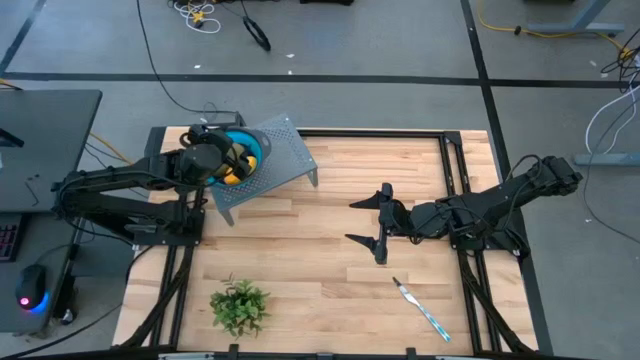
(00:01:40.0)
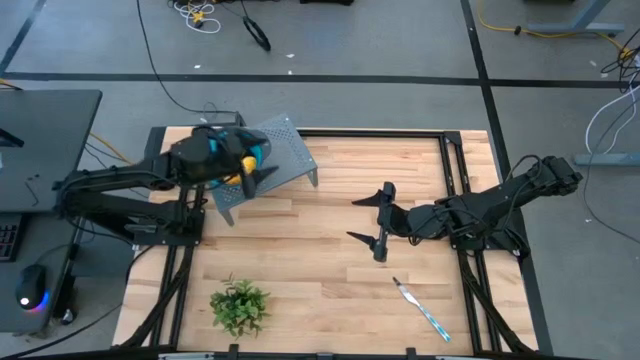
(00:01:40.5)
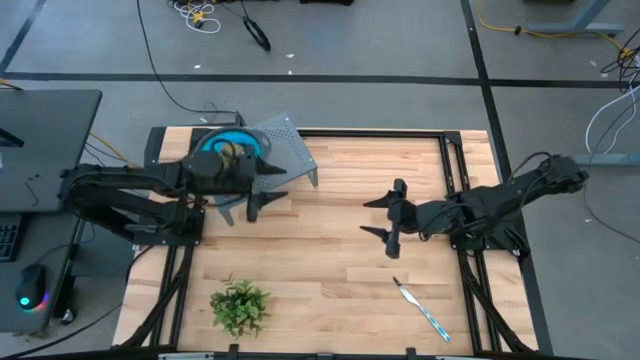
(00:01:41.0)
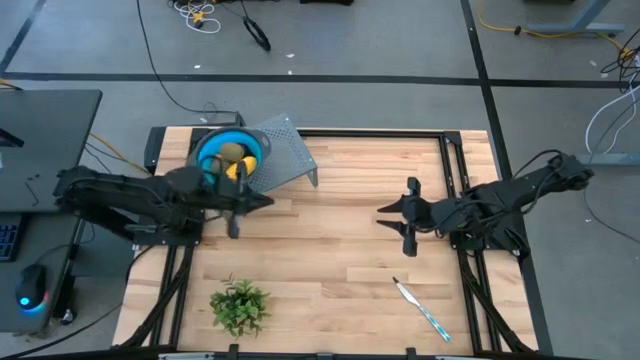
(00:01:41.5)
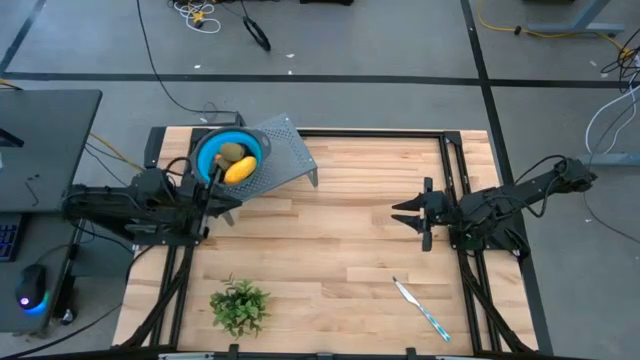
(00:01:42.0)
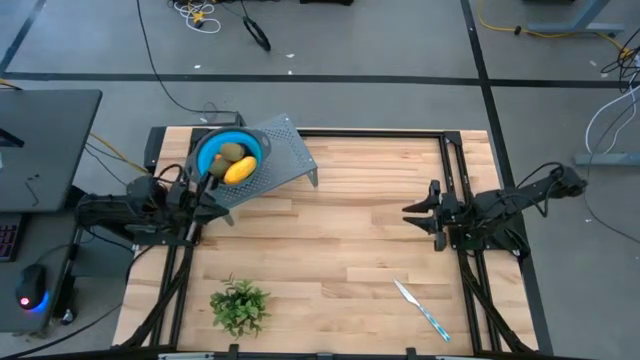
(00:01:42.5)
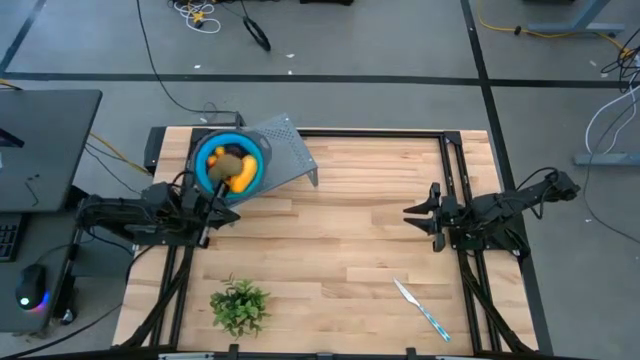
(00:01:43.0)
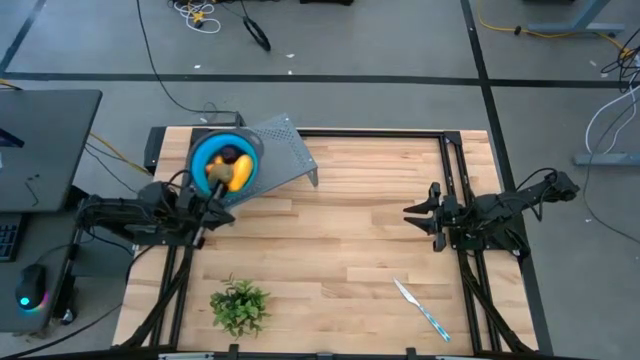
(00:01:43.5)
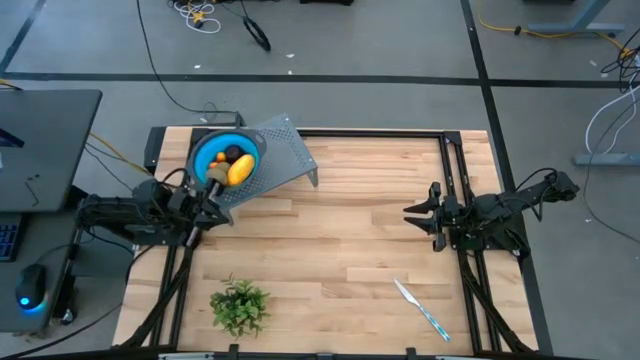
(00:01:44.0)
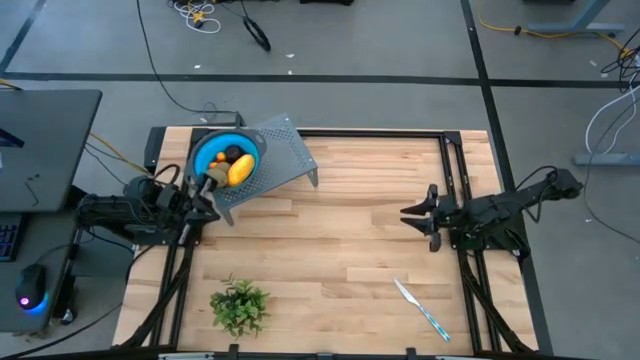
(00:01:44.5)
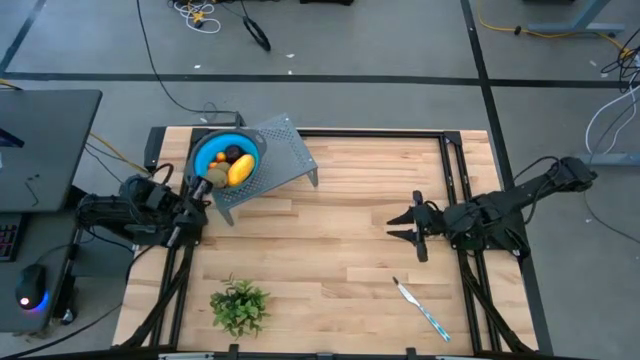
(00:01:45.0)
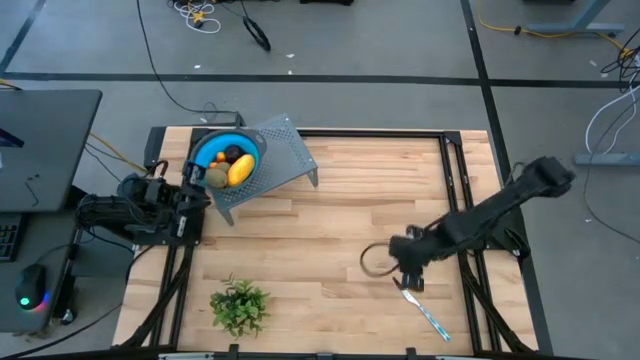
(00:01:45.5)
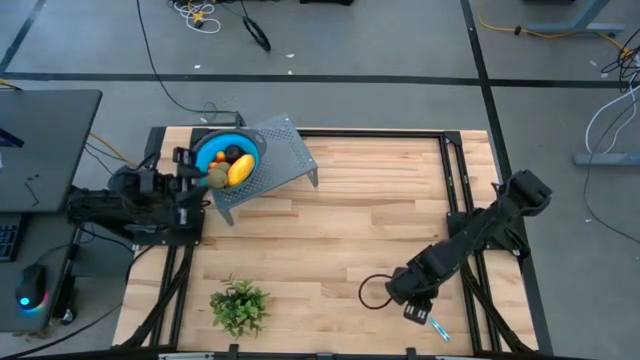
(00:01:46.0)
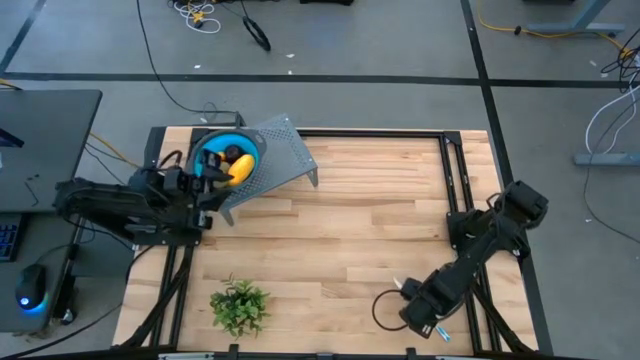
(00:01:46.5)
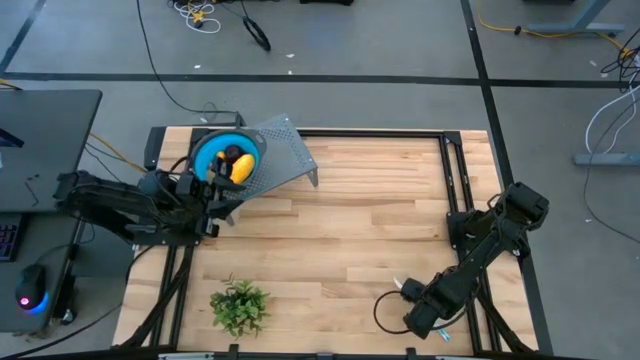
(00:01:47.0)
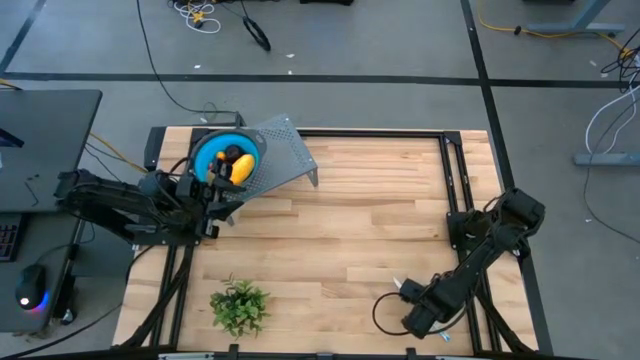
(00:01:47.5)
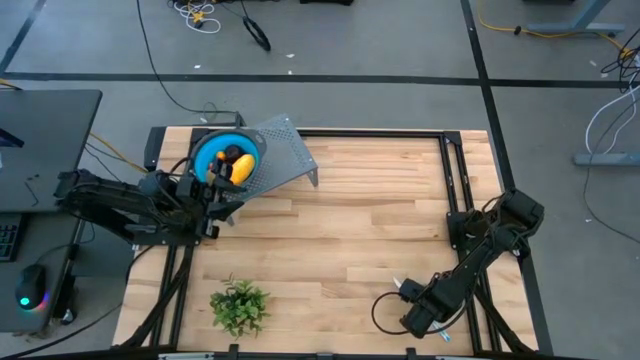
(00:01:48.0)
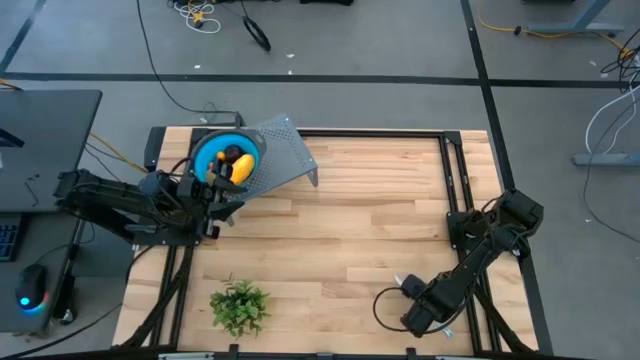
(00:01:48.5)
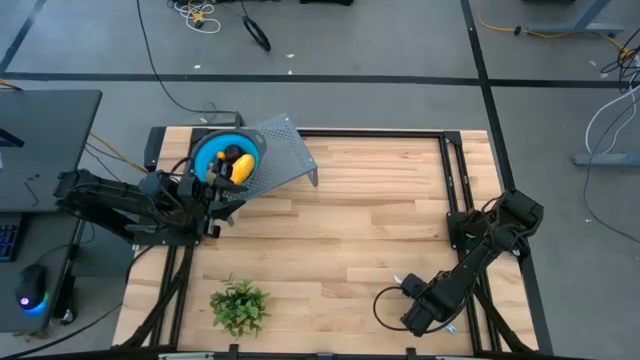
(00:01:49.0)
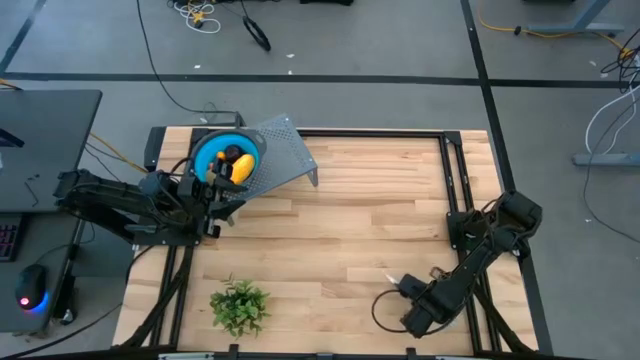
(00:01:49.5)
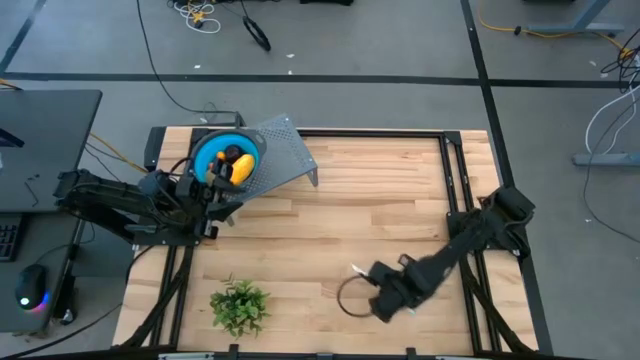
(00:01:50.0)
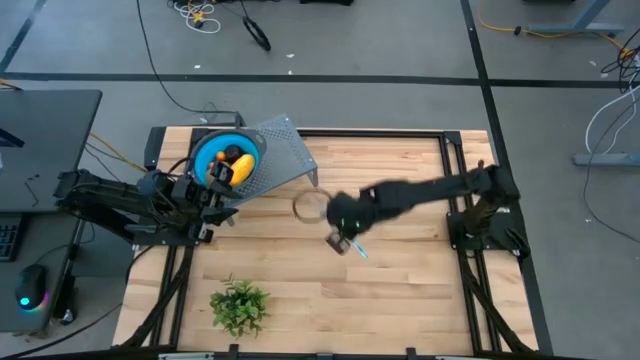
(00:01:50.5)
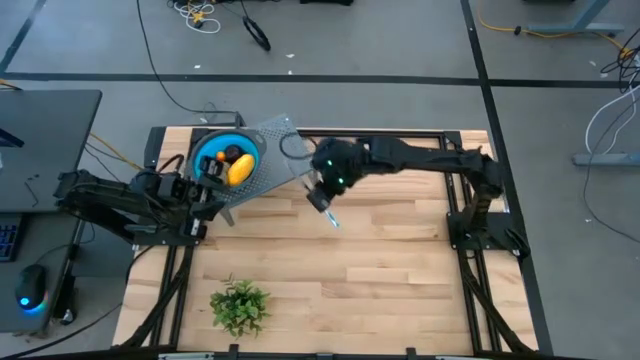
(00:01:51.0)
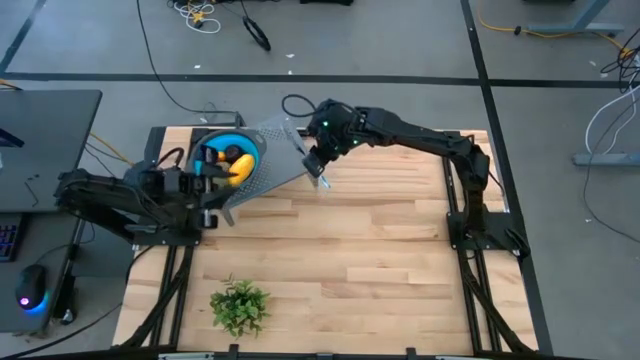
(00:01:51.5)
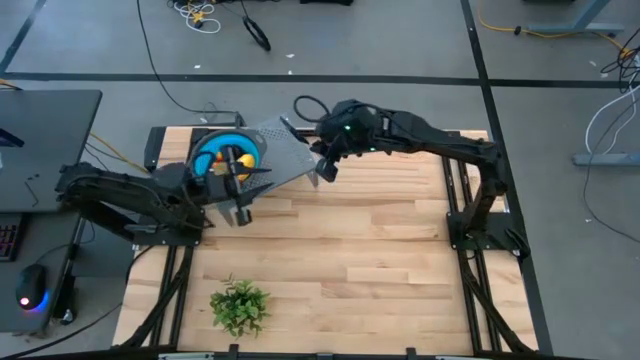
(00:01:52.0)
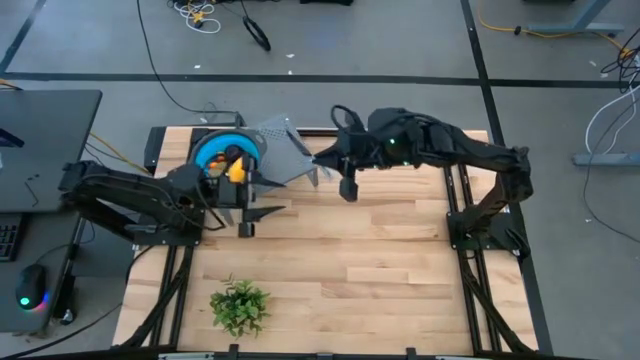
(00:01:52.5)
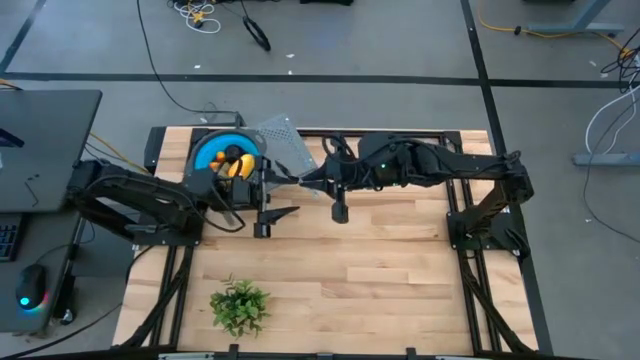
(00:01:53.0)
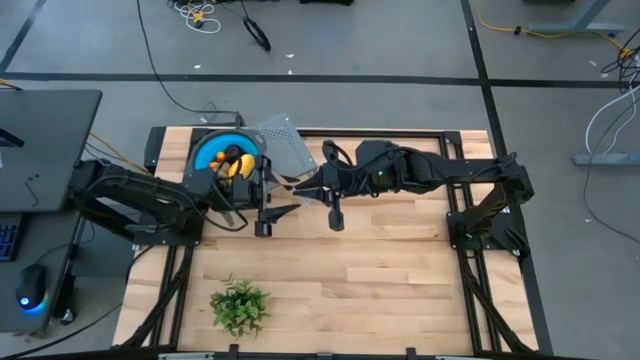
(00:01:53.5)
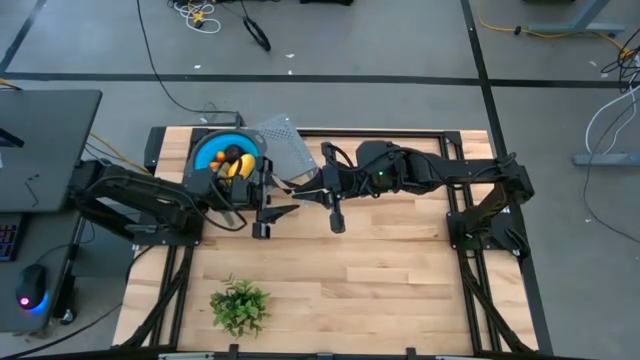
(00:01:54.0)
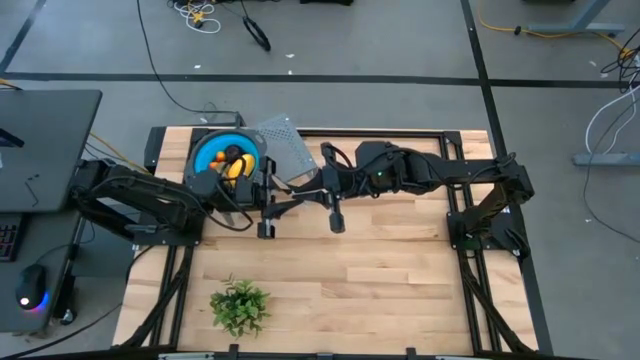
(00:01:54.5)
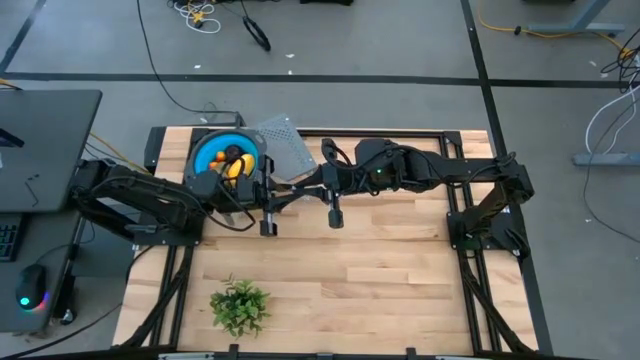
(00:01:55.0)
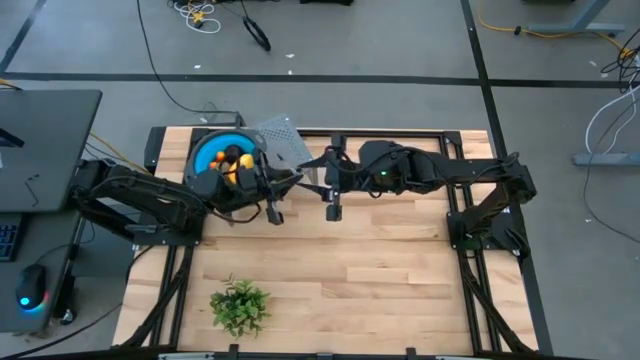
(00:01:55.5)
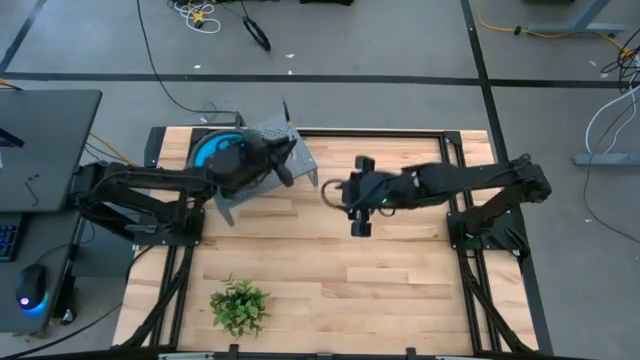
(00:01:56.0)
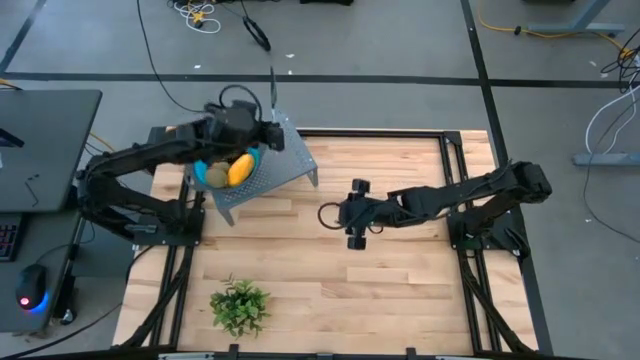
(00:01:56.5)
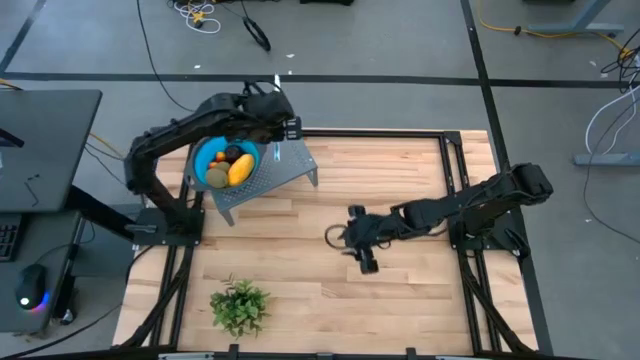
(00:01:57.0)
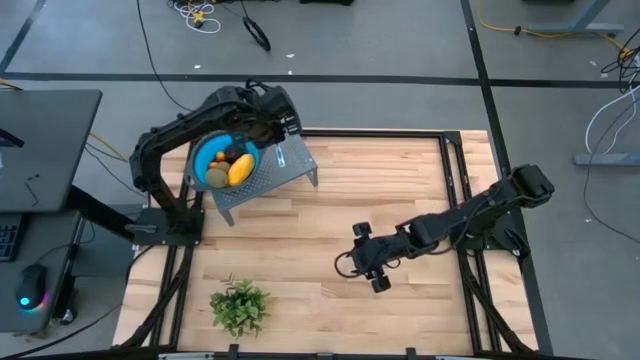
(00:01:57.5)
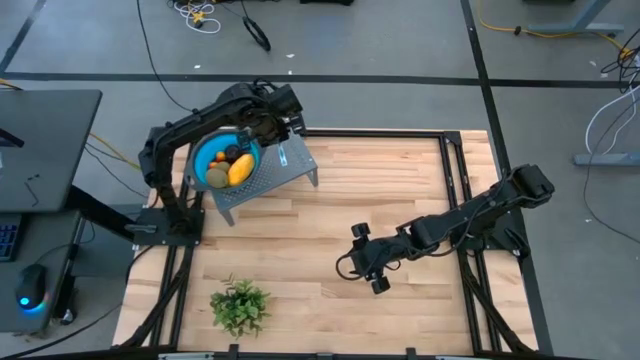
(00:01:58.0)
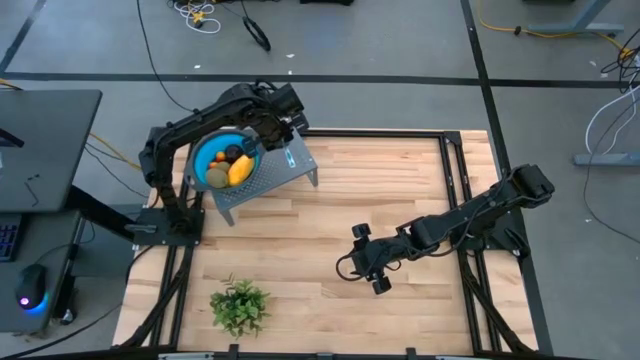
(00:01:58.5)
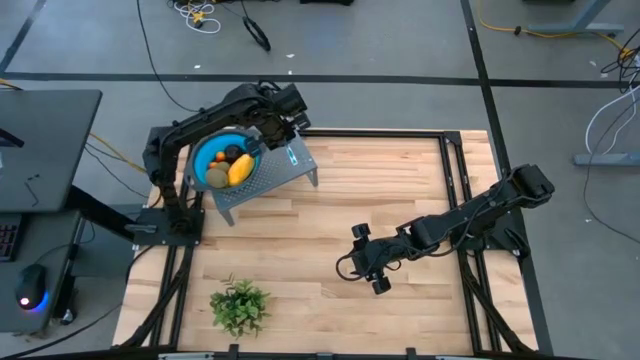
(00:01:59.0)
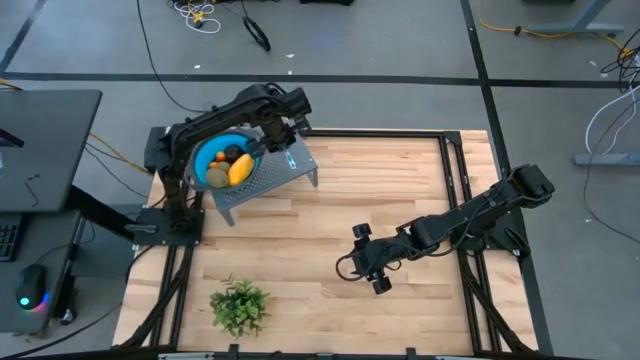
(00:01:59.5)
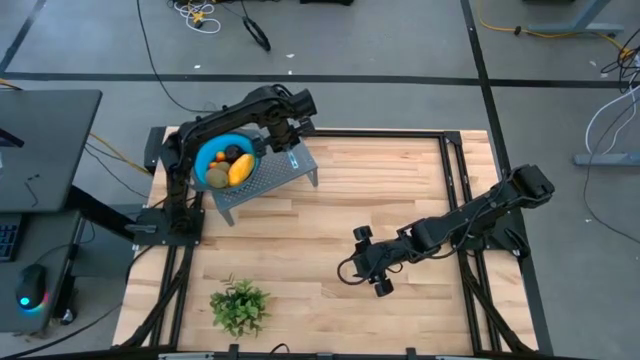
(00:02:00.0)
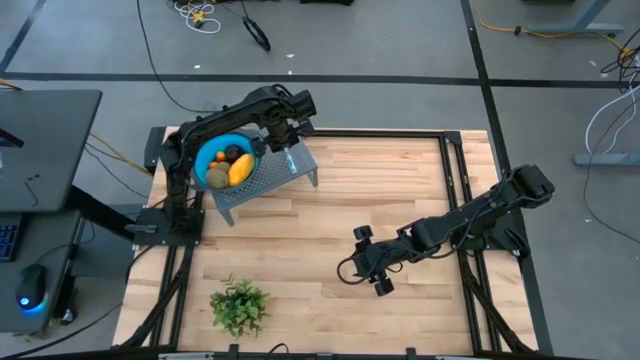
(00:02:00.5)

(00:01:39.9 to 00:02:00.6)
Task: Pick & Place Fruit
Put the blue table knife on the shelf

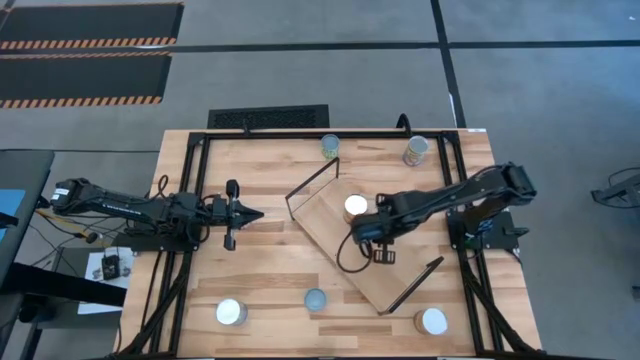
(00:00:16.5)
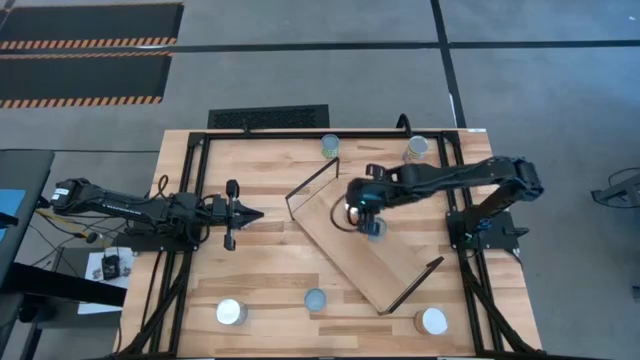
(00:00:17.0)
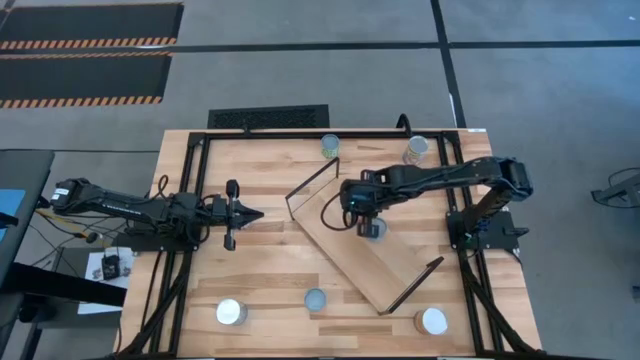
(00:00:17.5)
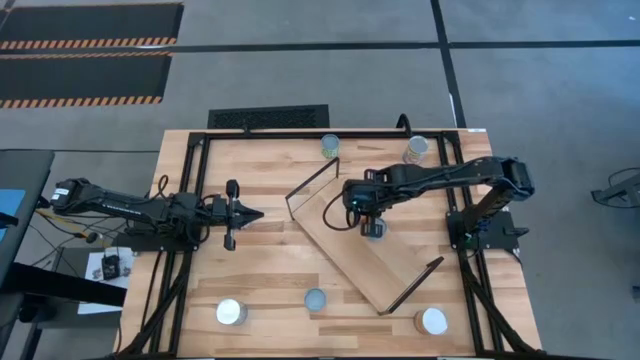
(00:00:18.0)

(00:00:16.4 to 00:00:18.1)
Task: Pick and place cans onto a shelf
Adjust the large canned corn on the shelf
